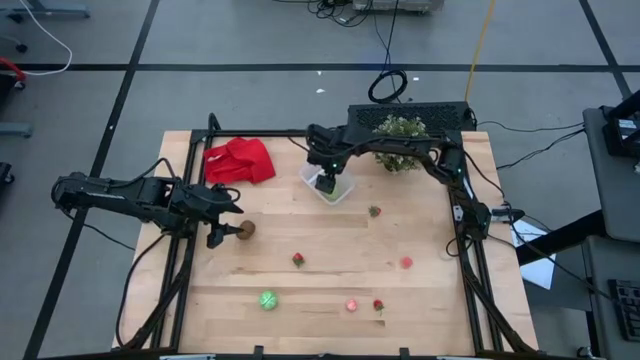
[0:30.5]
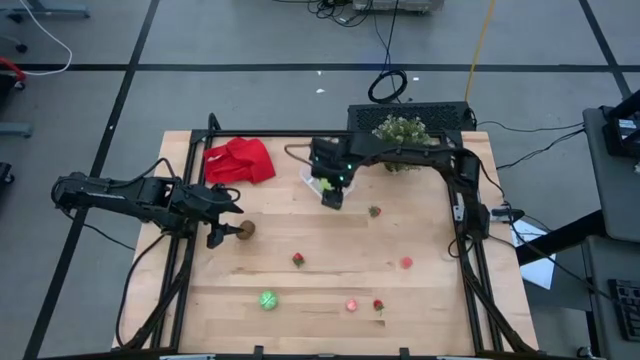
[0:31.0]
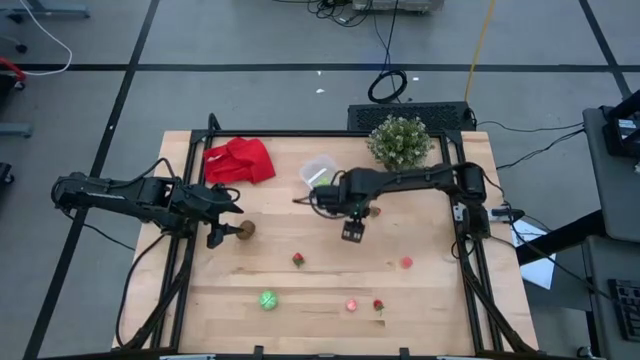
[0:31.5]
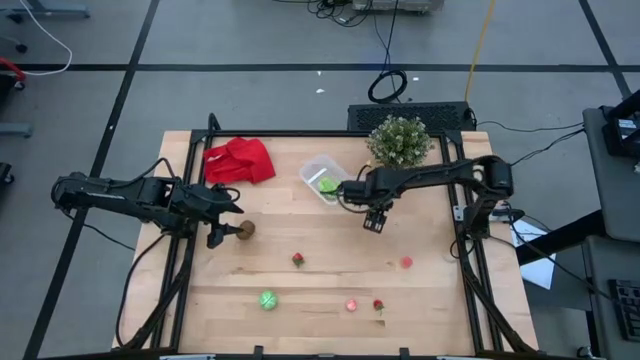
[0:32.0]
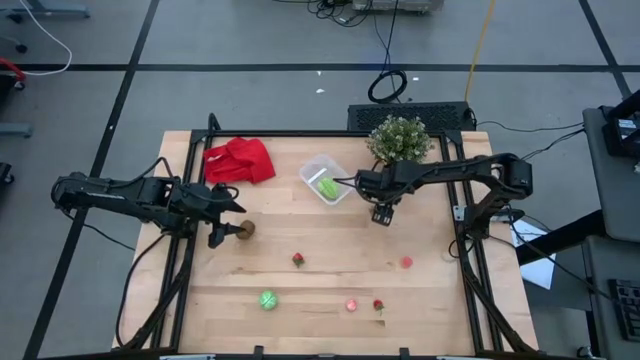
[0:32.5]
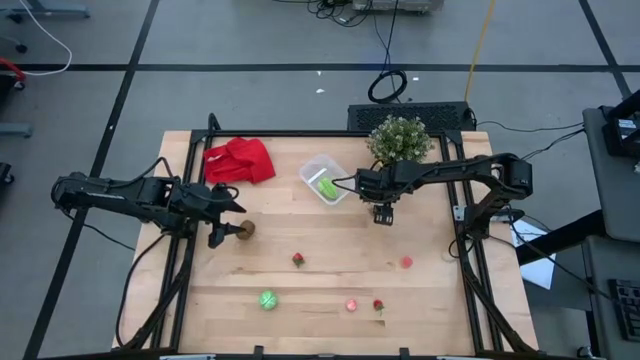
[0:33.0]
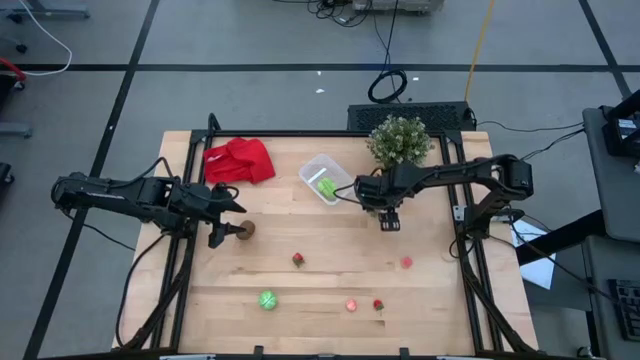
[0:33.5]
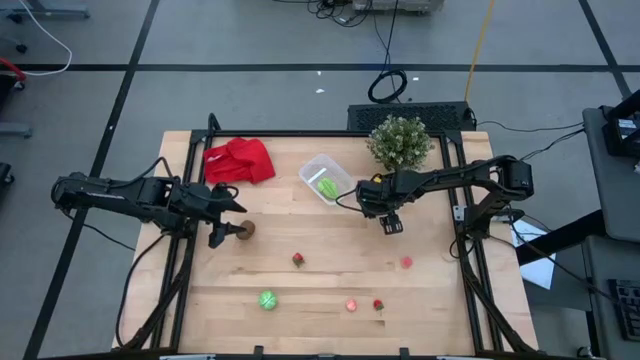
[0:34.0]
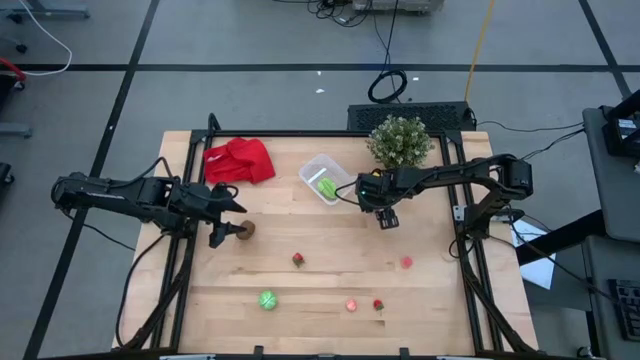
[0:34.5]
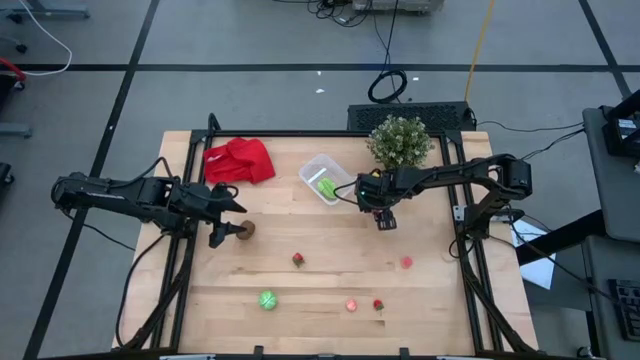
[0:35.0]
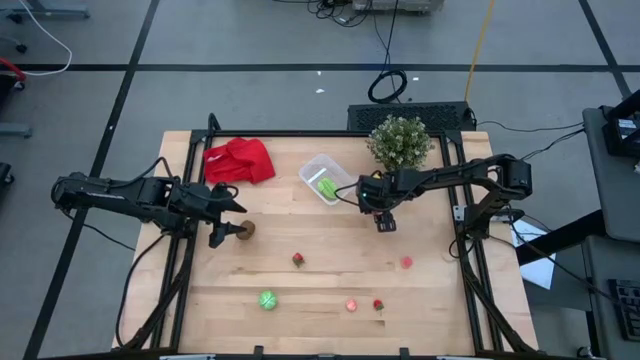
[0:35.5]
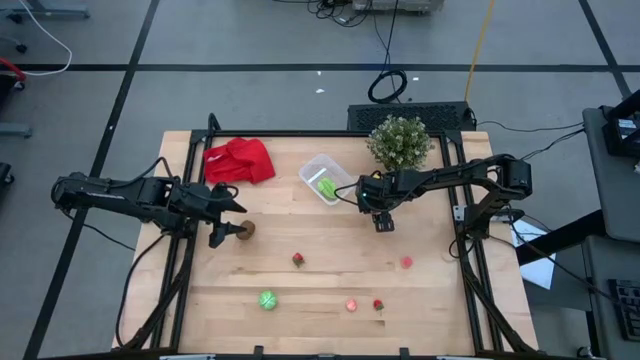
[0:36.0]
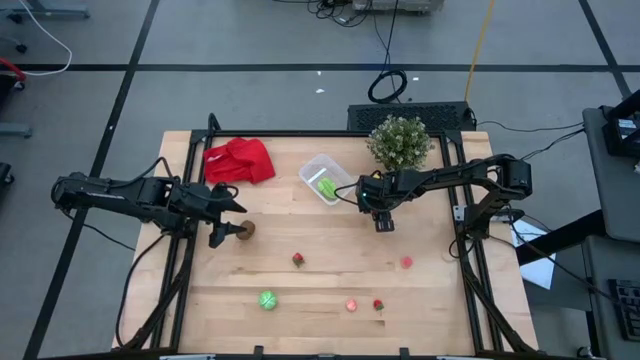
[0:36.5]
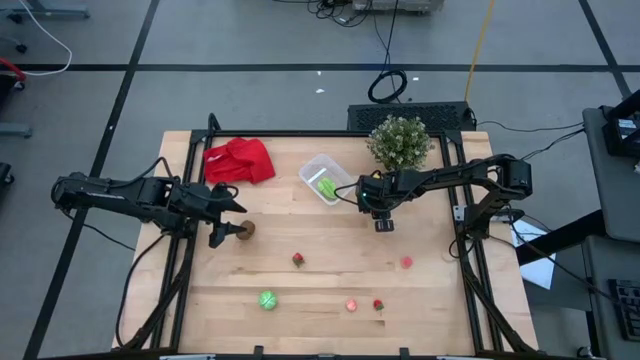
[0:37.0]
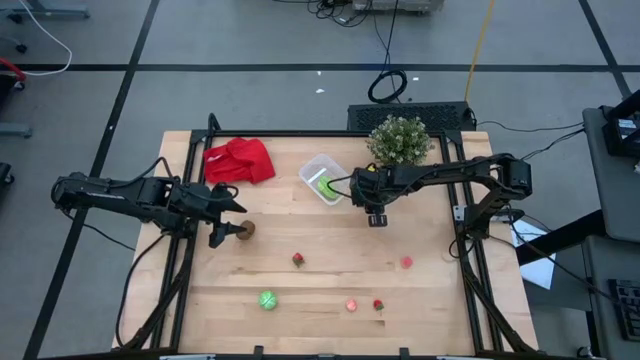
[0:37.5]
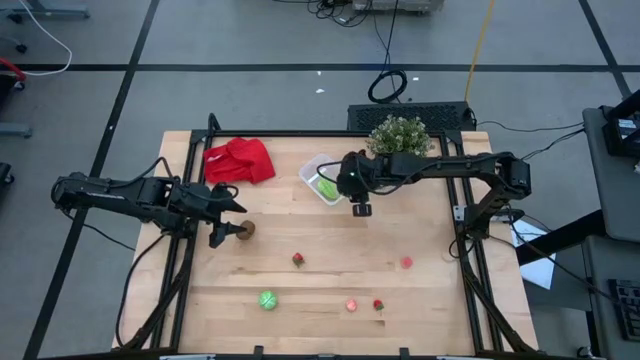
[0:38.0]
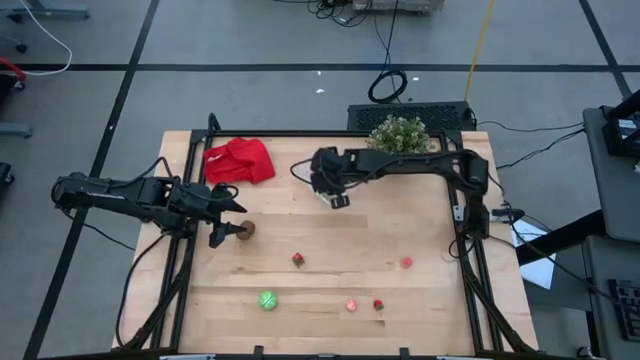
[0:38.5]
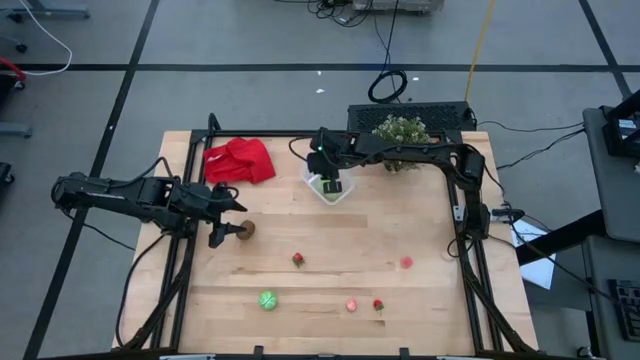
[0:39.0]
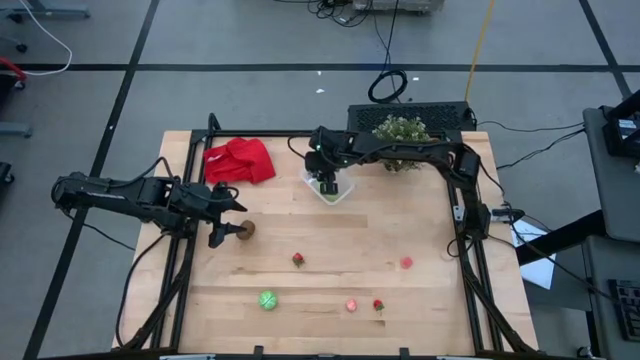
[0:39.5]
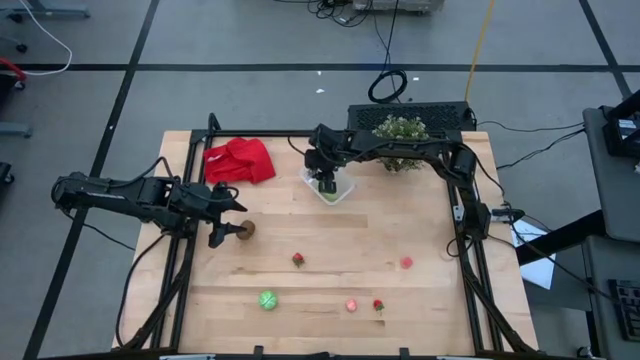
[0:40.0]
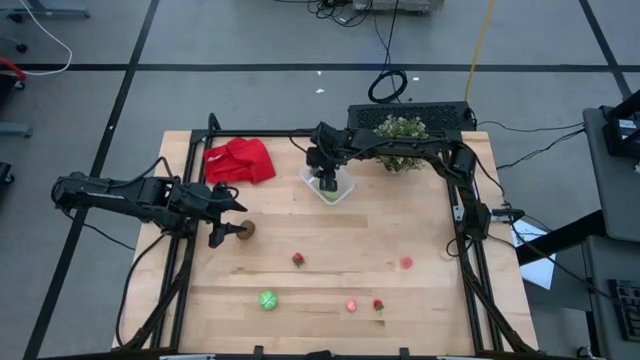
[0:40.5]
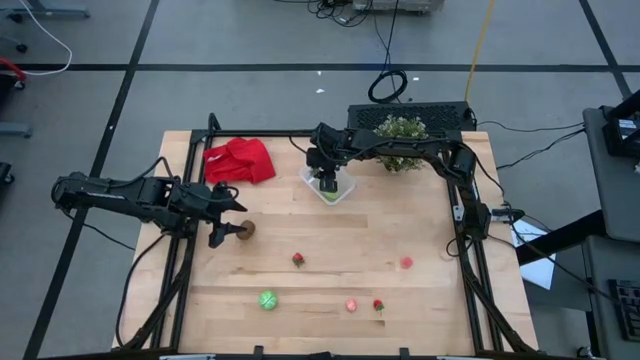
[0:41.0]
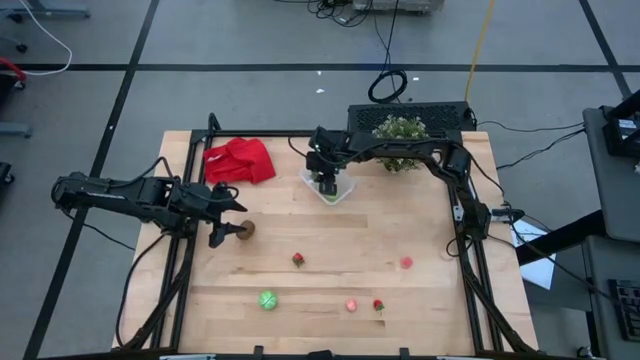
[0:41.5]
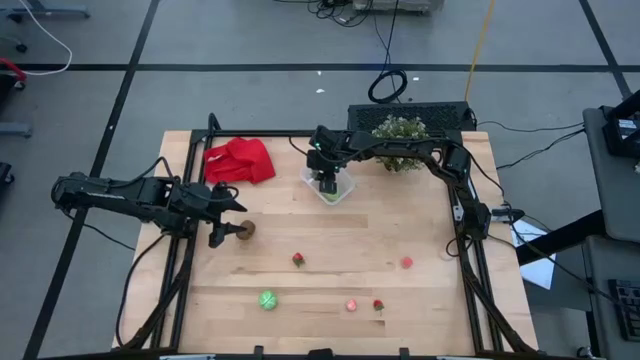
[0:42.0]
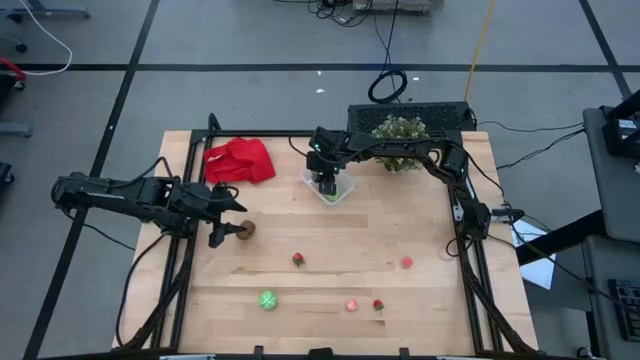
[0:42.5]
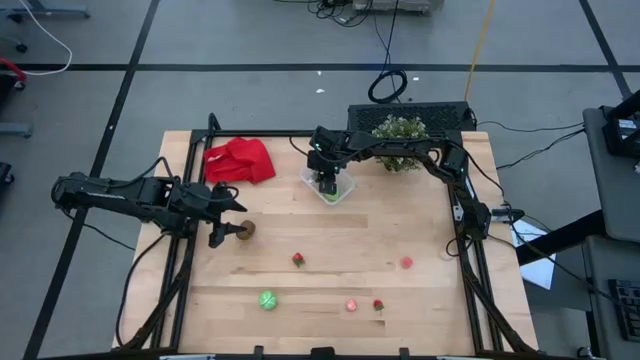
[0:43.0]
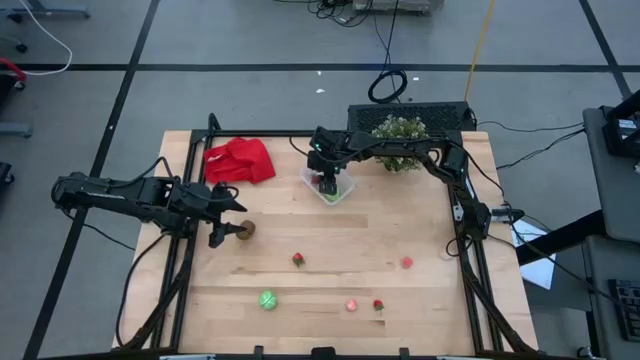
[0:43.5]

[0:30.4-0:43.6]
Task: Pick and placing Produce into tupperware
Put the top right red strawberry into the transparent bin

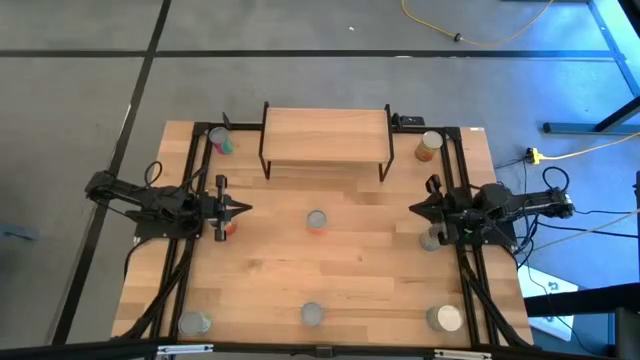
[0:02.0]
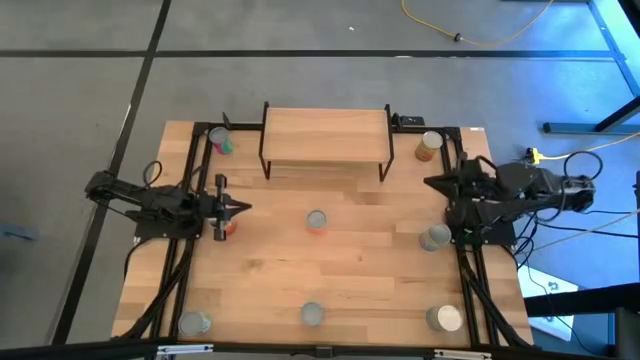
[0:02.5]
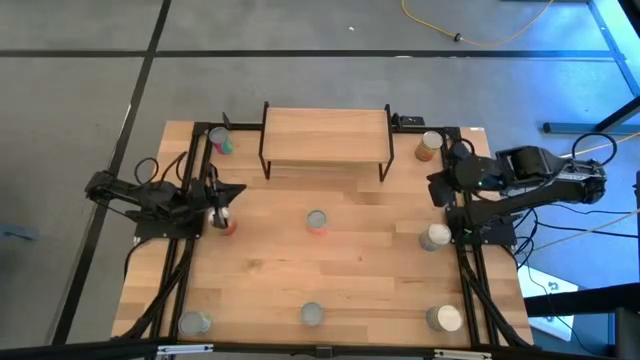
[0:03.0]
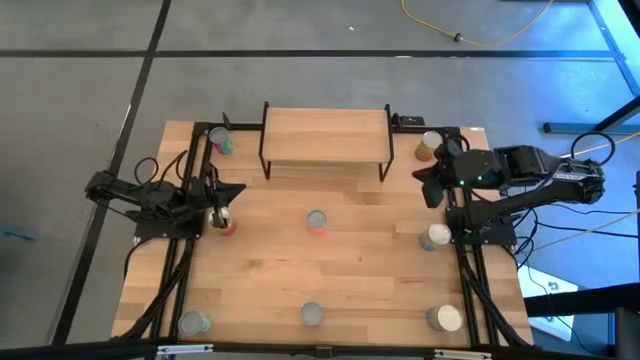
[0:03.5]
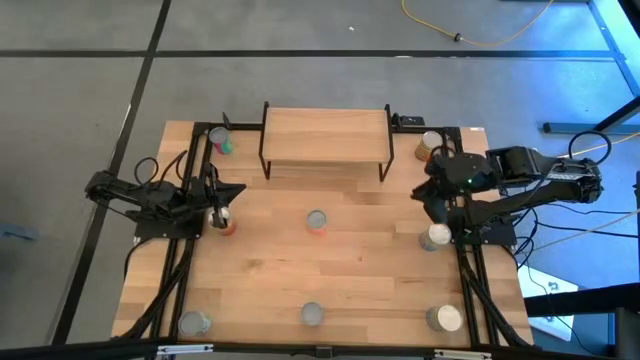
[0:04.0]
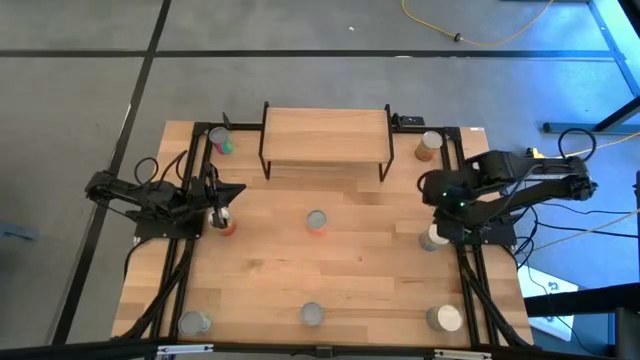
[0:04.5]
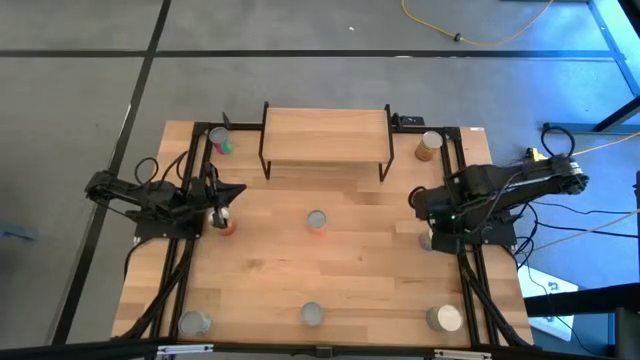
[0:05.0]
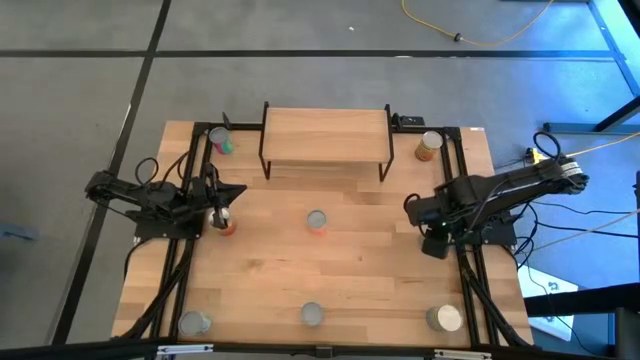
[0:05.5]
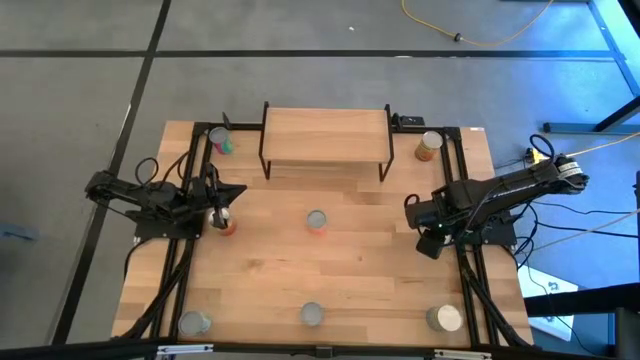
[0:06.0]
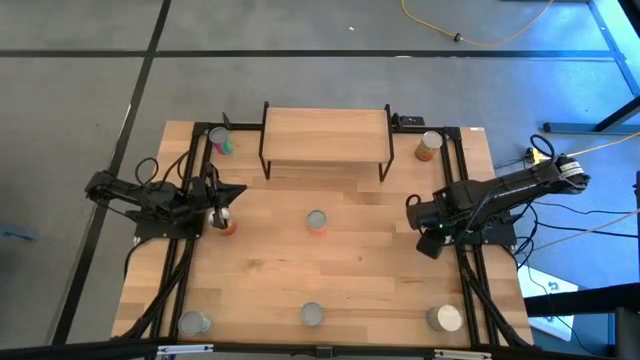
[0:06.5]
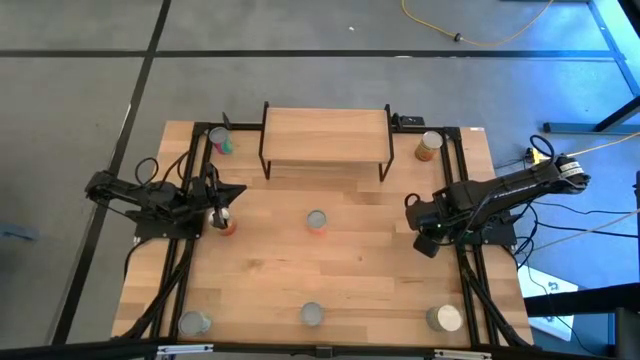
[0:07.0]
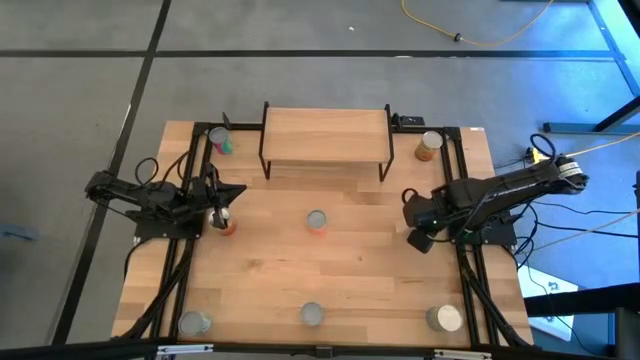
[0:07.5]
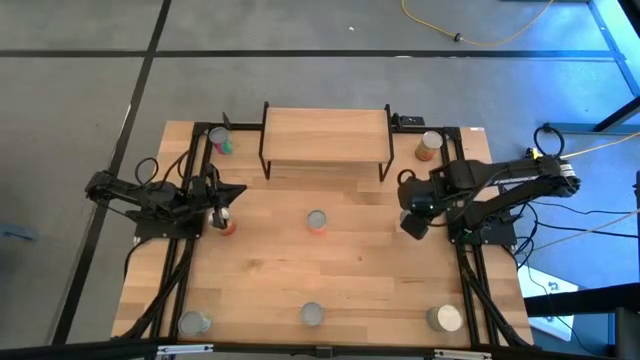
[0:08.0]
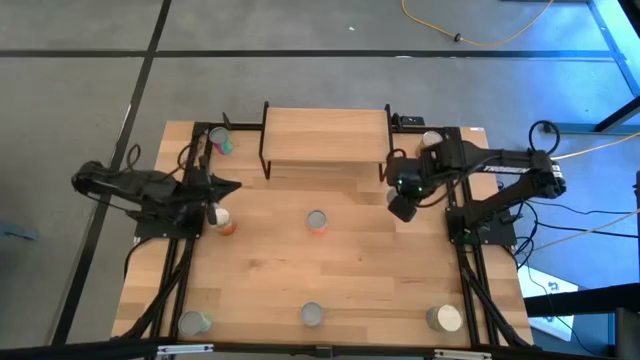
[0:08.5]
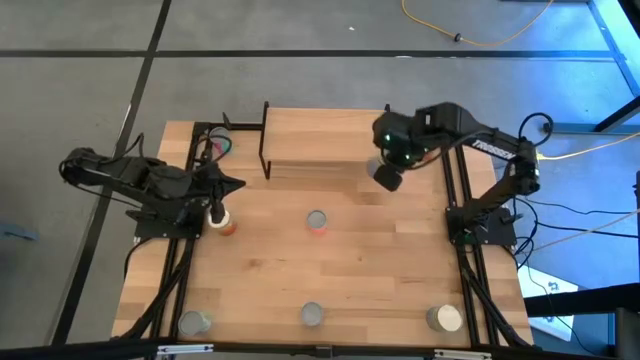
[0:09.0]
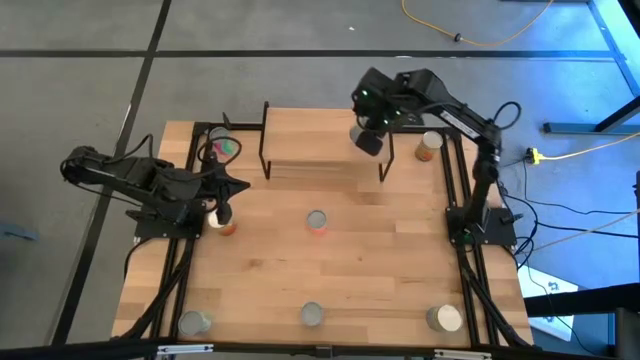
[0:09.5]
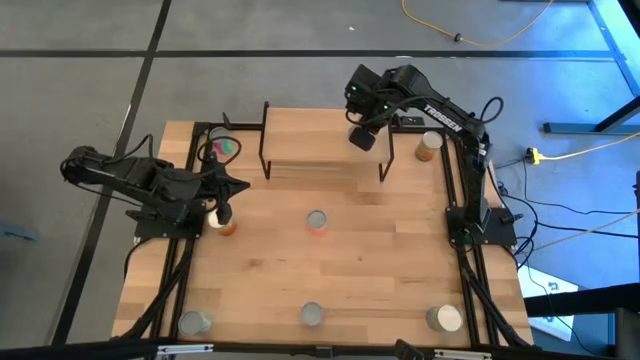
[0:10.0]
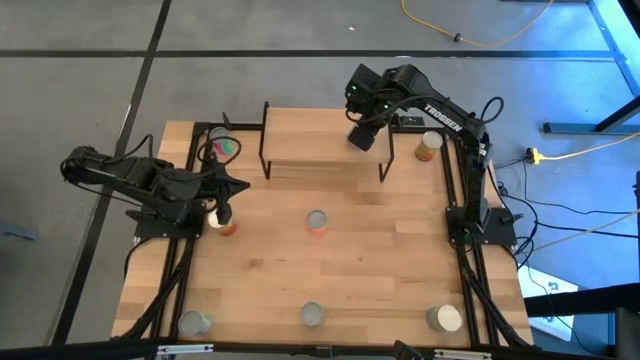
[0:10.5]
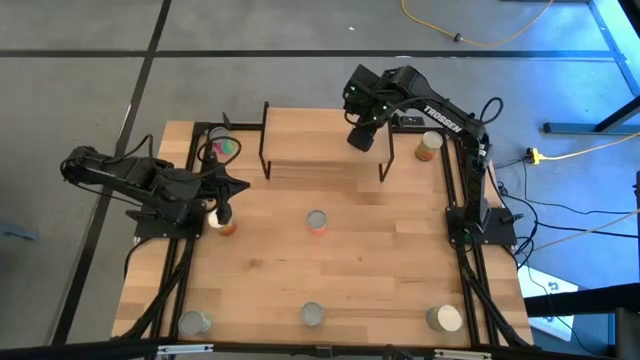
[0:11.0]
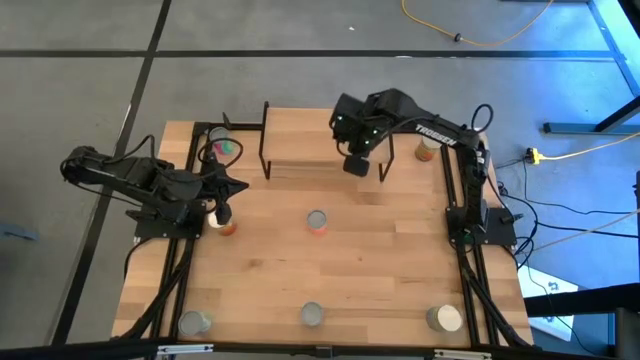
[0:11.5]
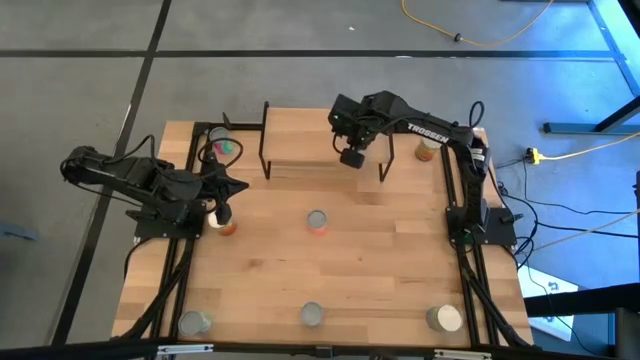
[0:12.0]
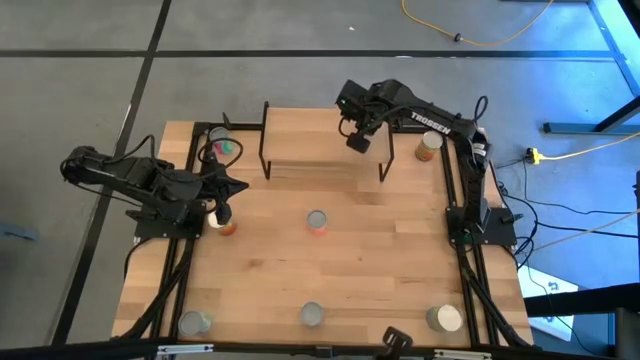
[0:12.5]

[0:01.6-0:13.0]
Task: Pick and place cans onto a shelf
Put the top canned cherry on the shelf
